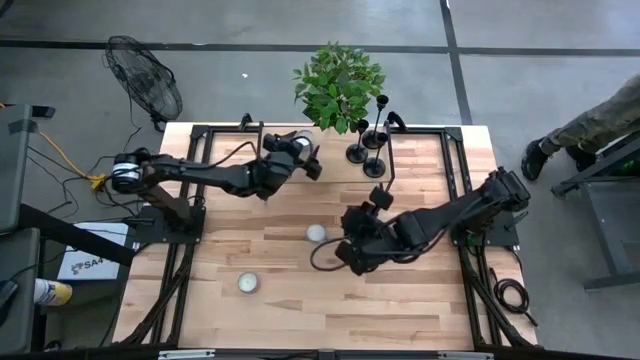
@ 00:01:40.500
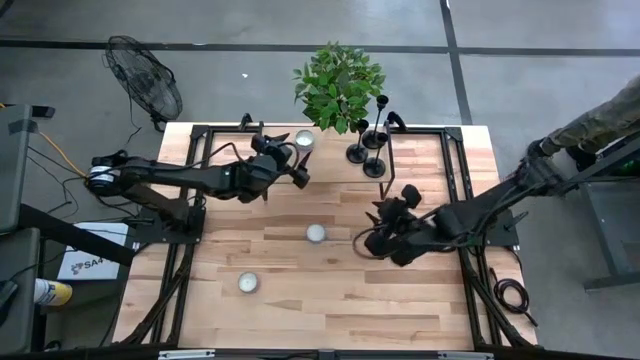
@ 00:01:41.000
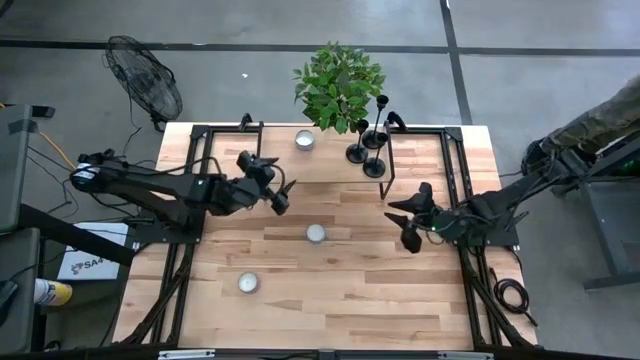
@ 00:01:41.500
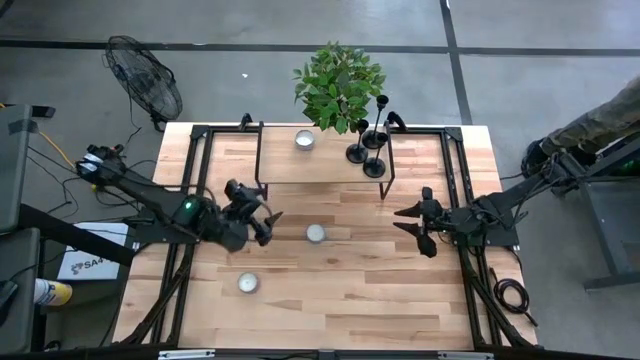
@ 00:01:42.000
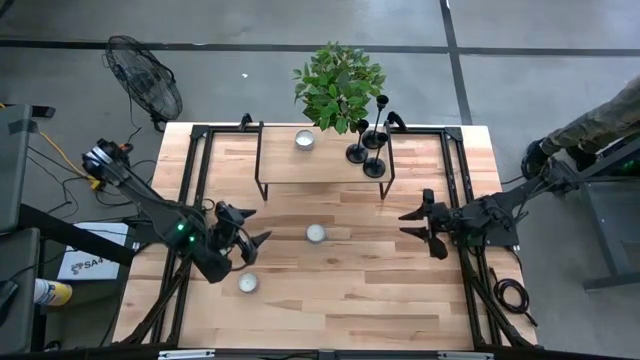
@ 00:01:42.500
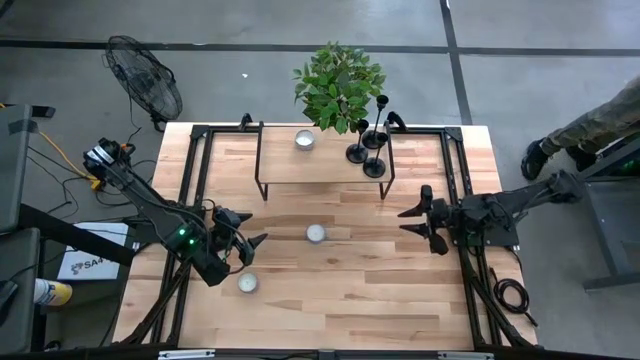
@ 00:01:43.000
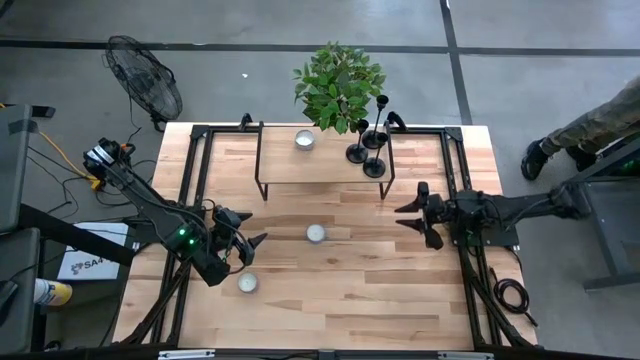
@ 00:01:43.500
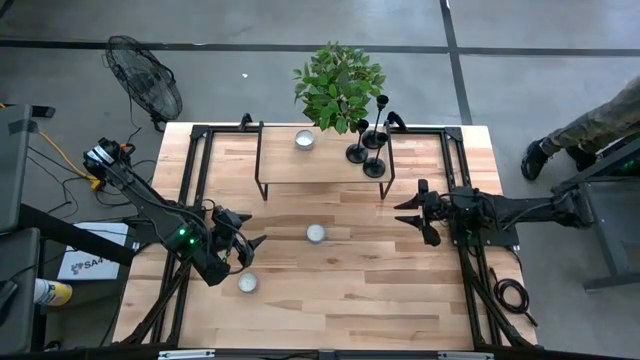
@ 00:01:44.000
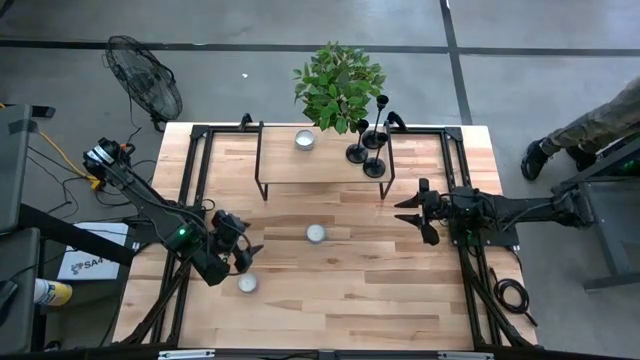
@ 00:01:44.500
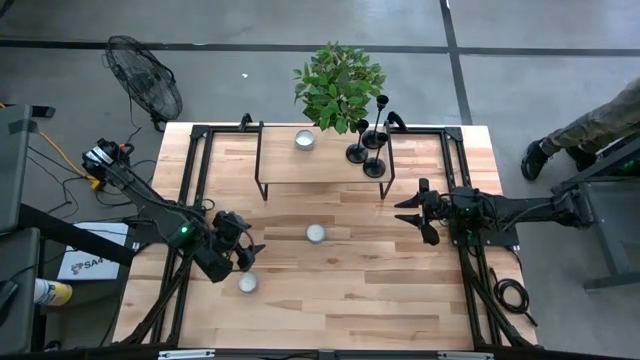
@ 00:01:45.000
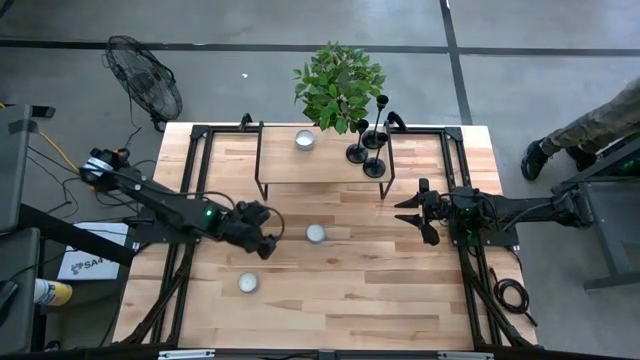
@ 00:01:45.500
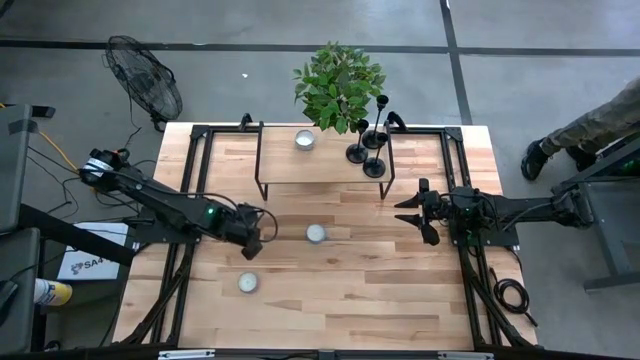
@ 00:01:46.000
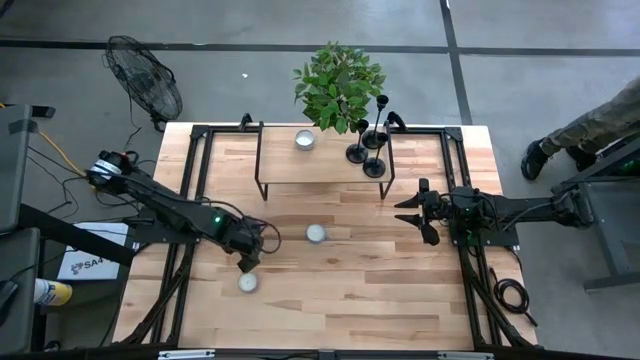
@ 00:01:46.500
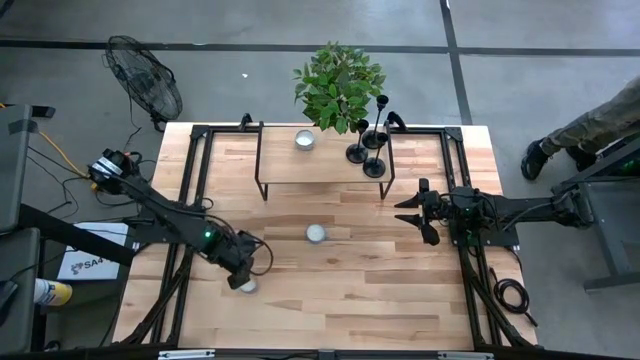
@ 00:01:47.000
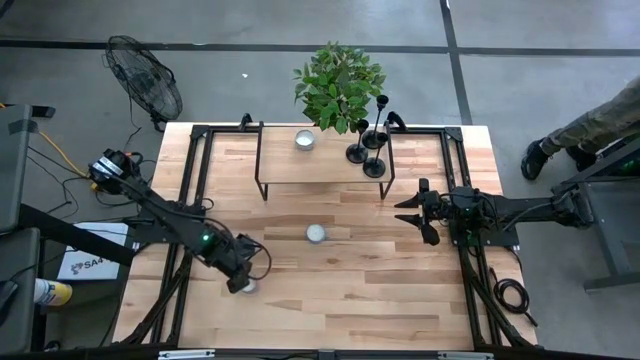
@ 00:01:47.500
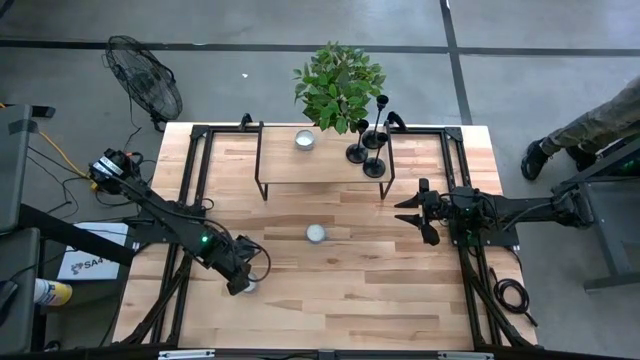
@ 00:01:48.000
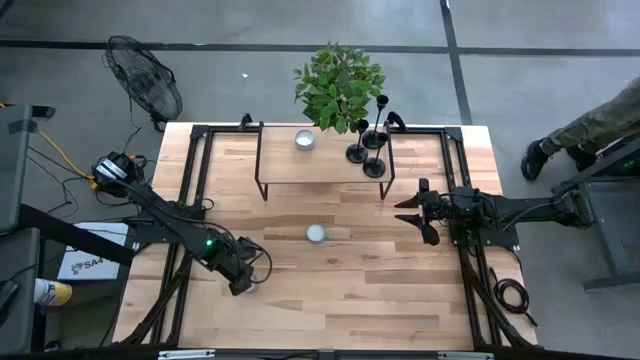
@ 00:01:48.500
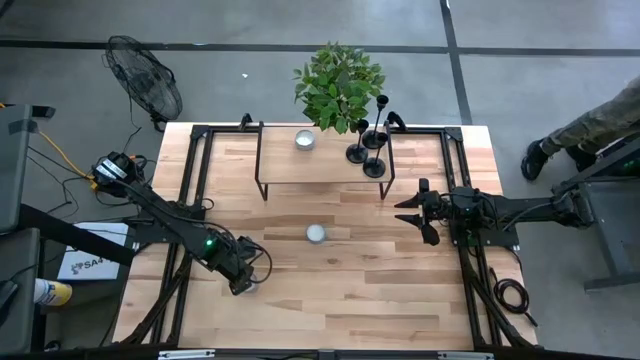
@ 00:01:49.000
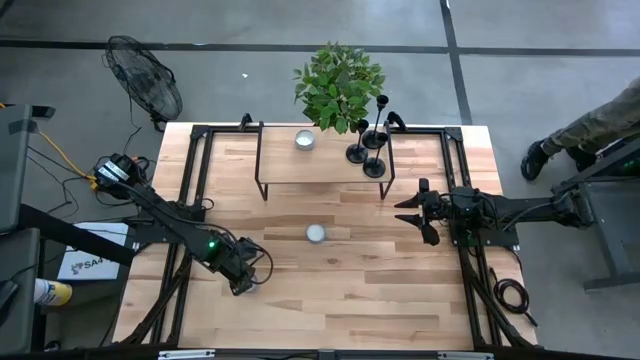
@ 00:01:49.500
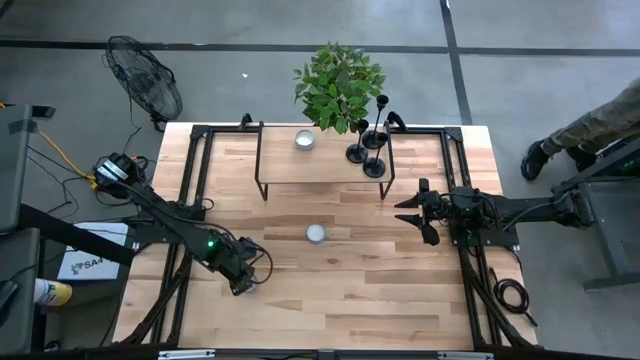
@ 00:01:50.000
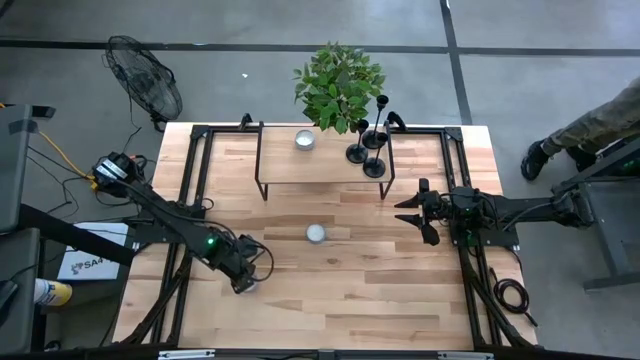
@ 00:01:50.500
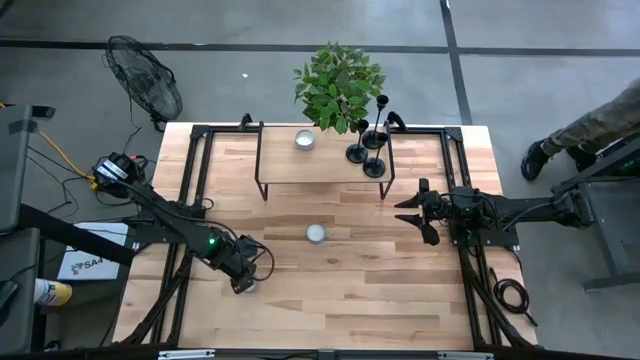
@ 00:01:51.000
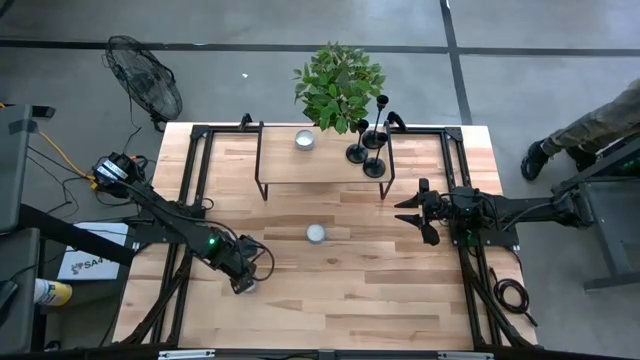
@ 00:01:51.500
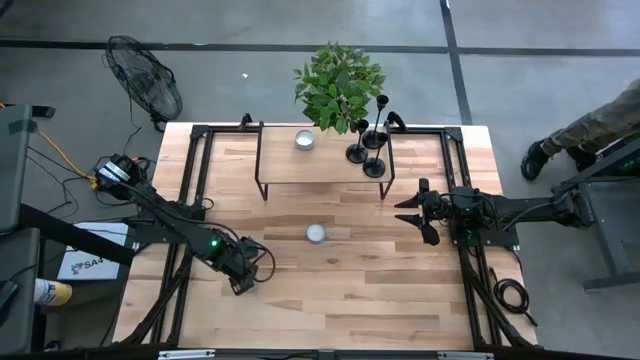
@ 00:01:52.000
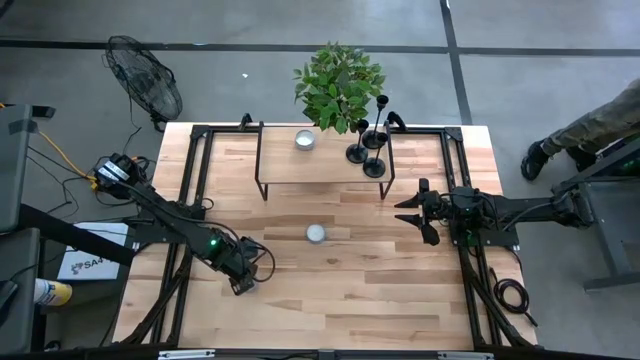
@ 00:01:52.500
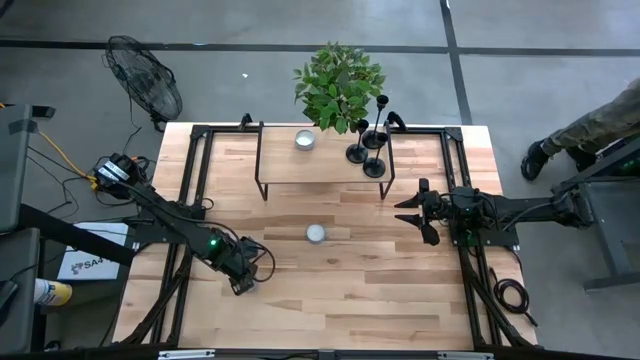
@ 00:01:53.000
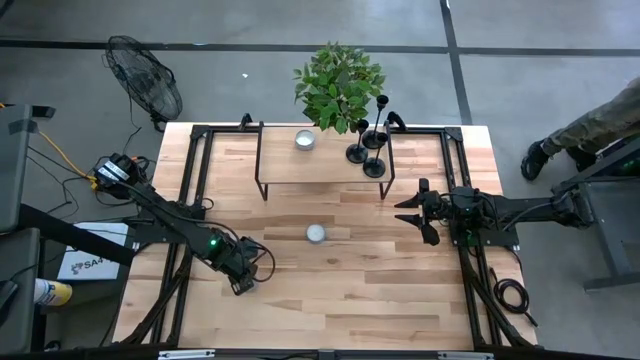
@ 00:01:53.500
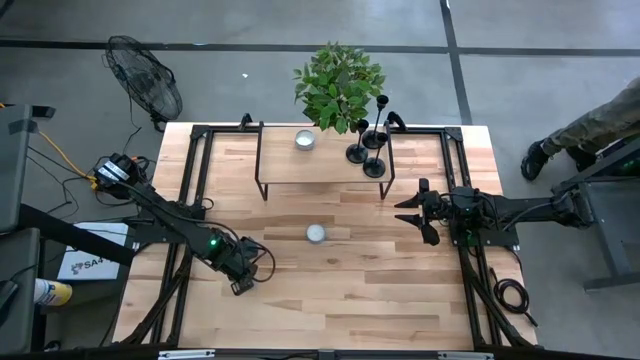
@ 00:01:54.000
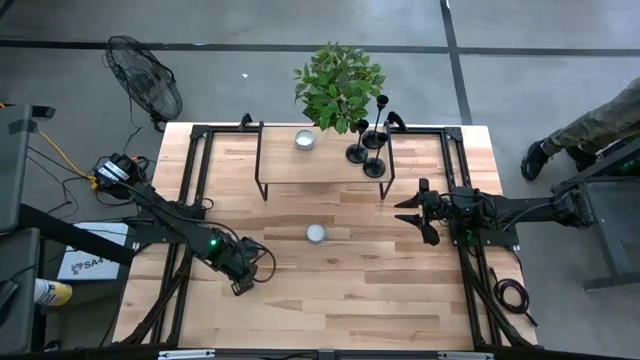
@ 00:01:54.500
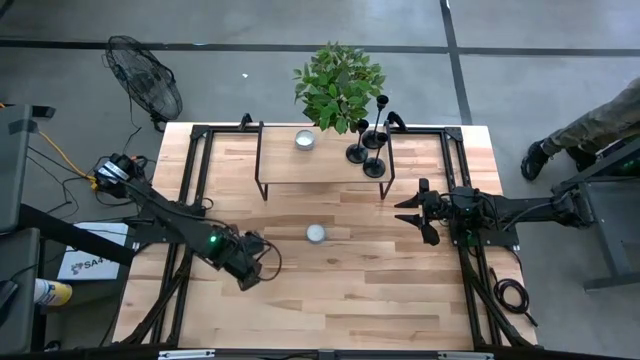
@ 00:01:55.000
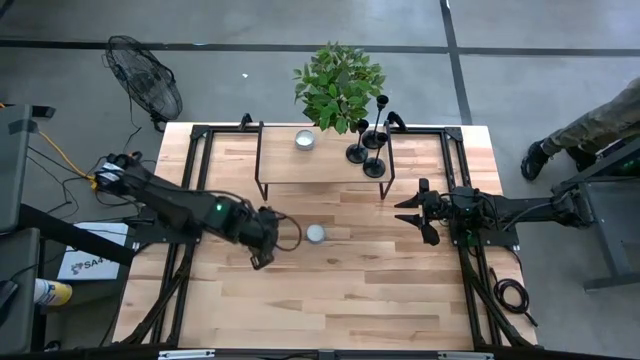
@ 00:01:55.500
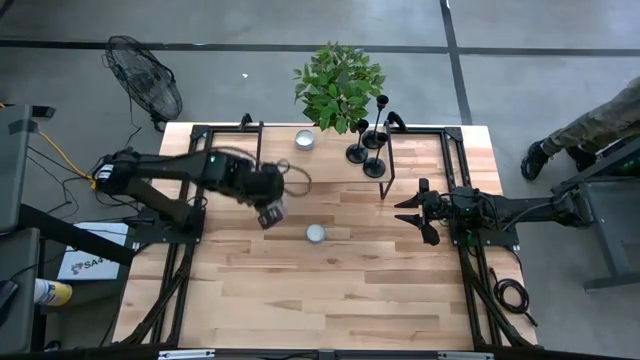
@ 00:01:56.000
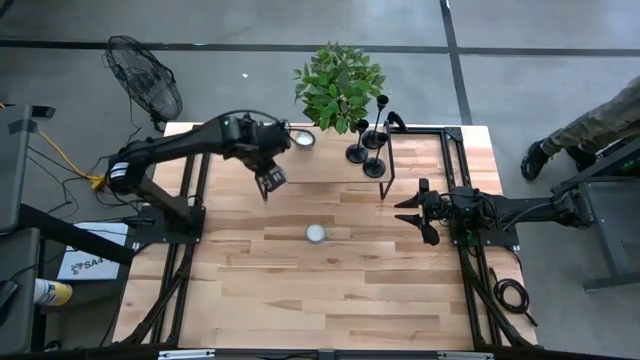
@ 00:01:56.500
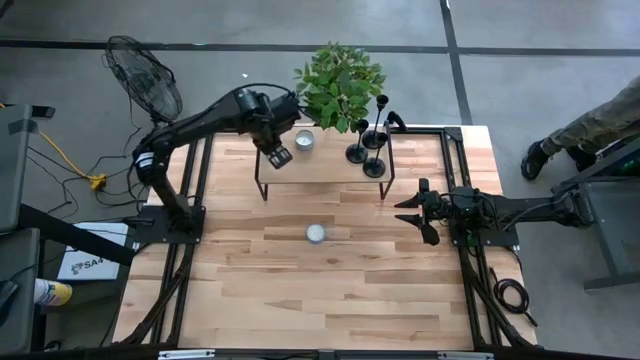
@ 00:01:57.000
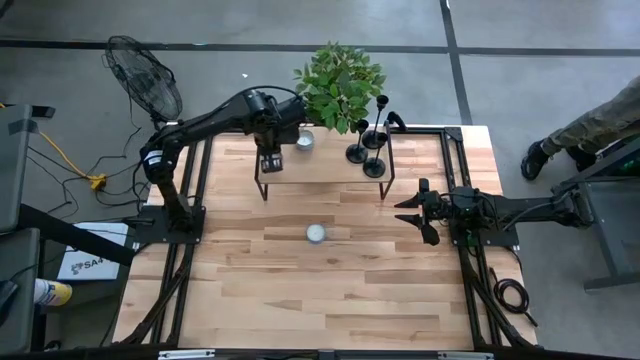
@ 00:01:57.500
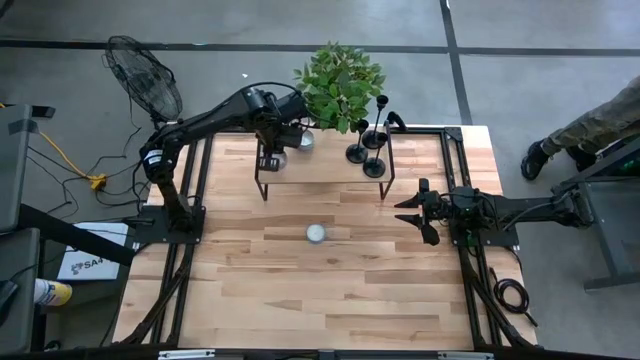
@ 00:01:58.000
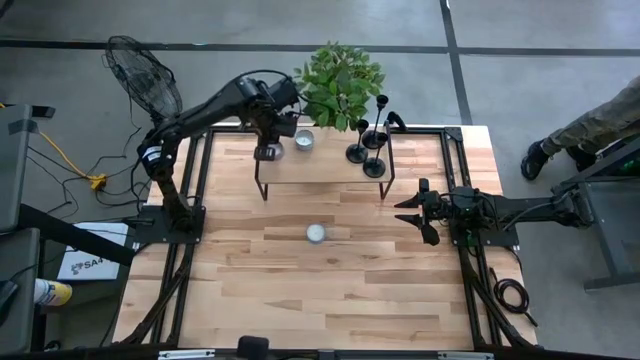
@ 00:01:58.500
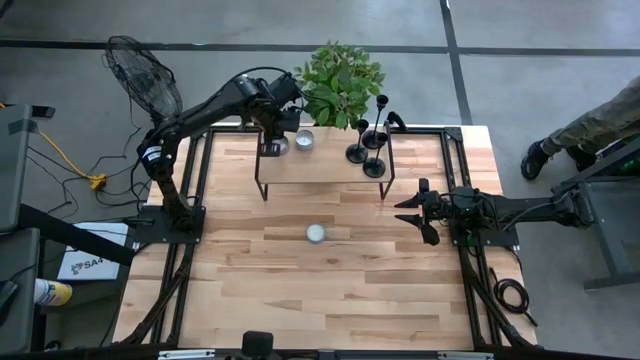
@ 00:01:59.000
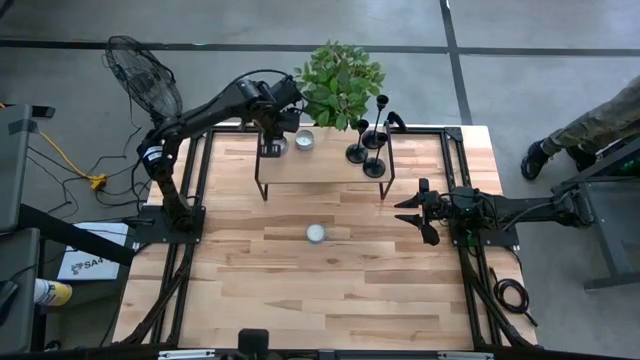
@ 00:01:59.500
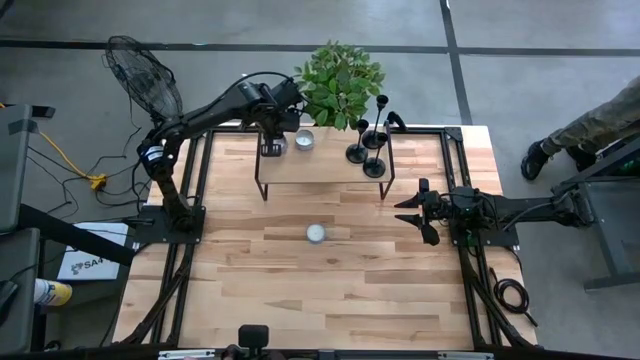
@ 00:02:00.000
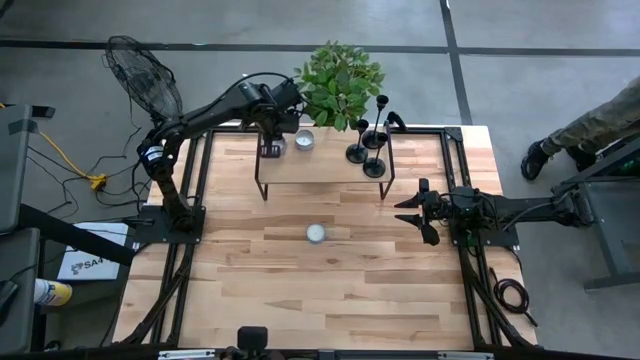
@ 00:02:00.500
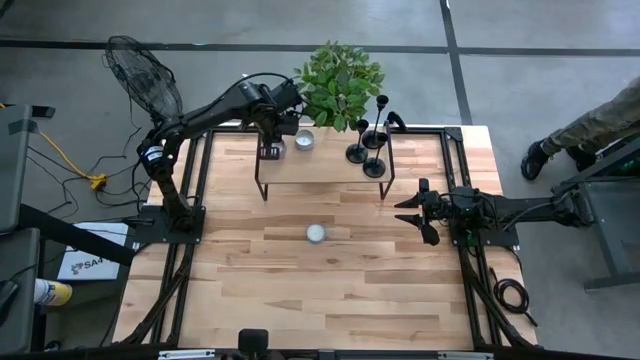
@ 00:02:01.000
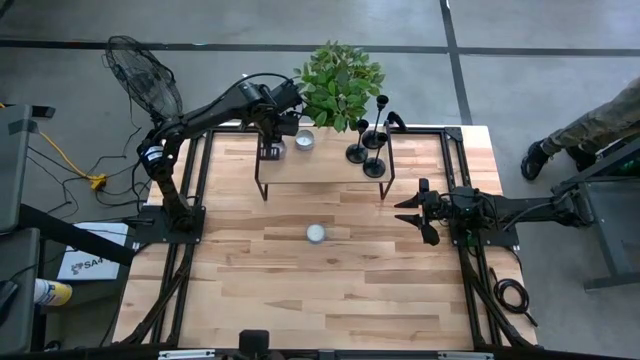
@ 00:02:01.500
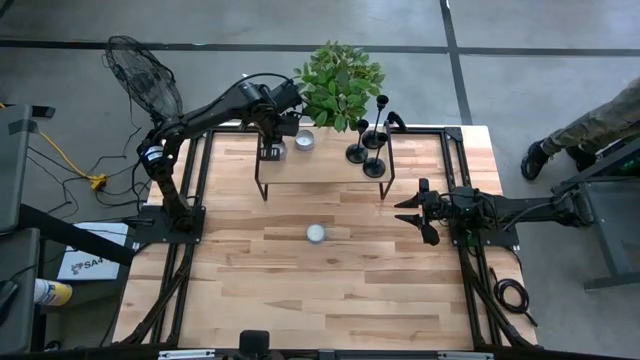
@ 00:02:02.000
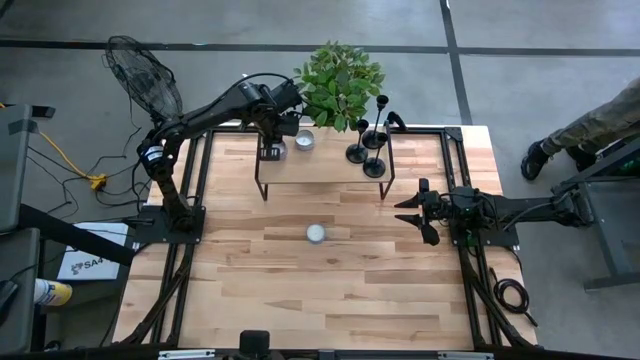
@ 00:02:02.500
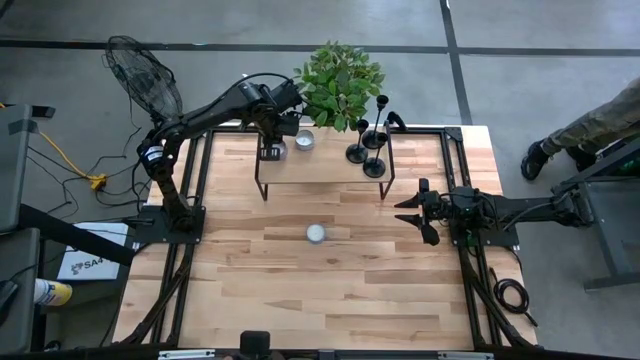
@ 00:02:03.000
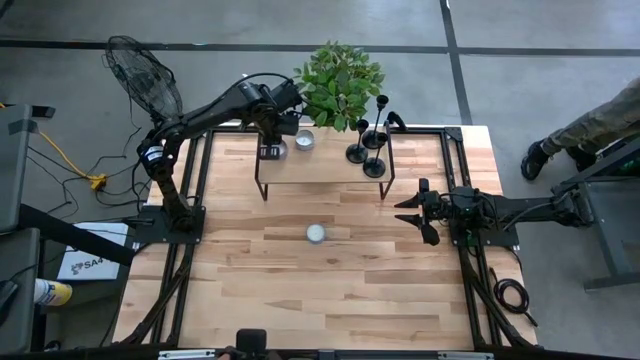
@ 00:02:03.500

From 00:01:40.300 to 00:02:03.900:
Task: Pick & Place candle stick holders
Put the red scented candle on the shelf
